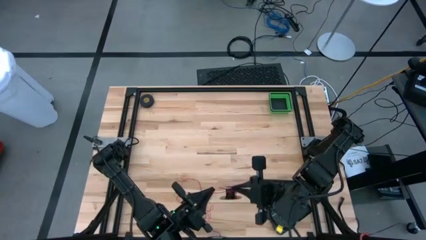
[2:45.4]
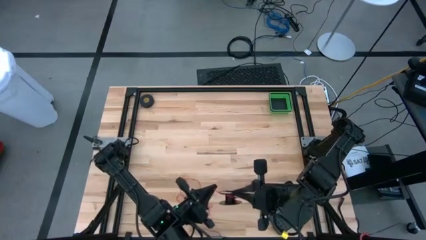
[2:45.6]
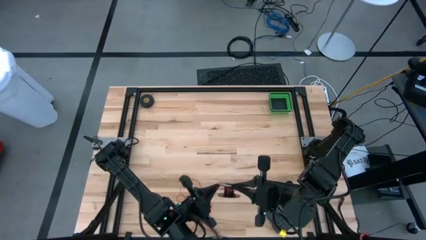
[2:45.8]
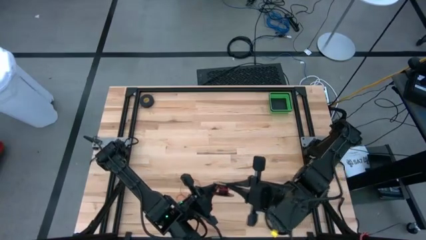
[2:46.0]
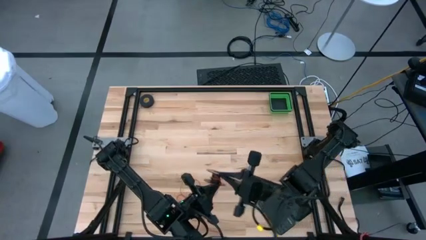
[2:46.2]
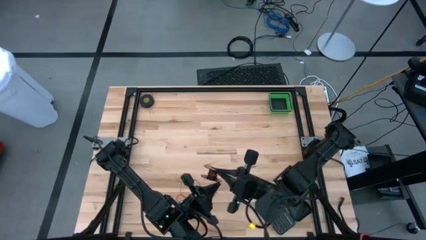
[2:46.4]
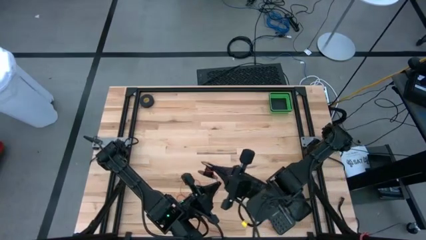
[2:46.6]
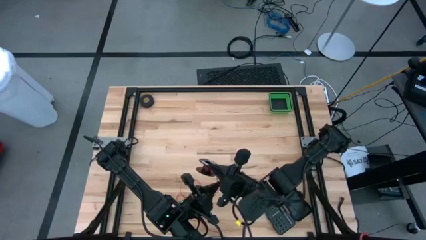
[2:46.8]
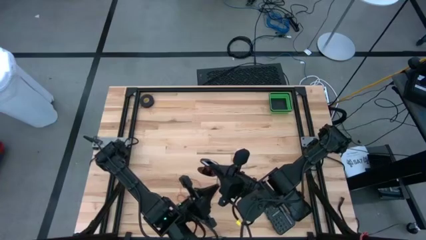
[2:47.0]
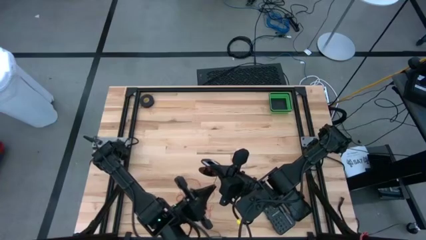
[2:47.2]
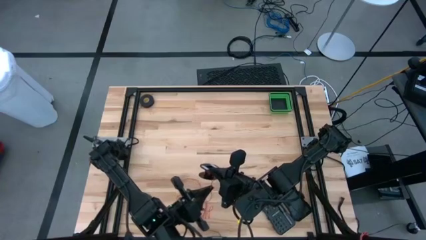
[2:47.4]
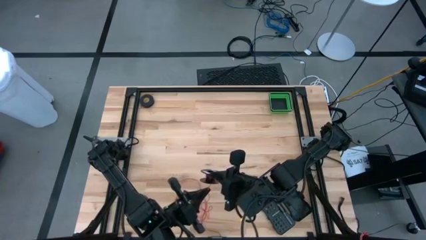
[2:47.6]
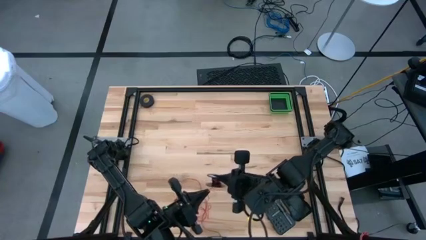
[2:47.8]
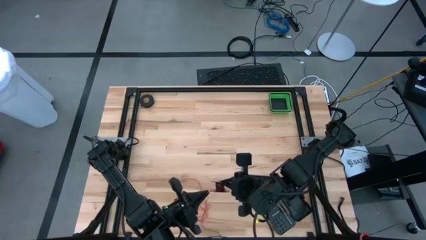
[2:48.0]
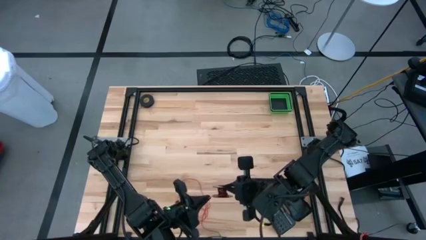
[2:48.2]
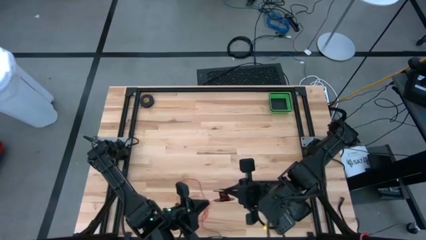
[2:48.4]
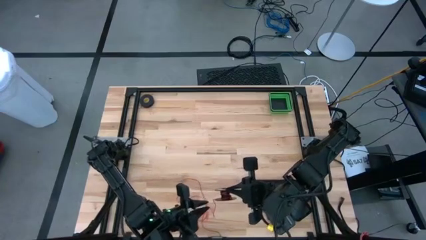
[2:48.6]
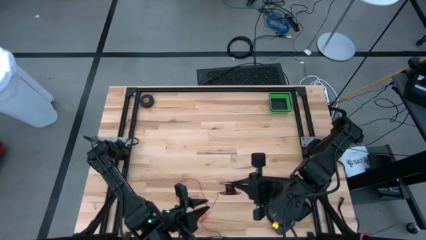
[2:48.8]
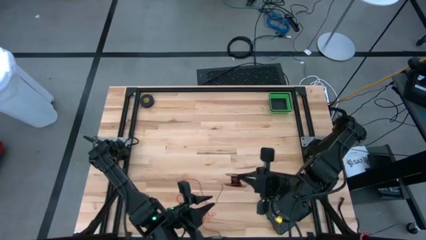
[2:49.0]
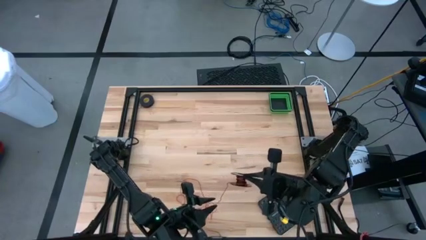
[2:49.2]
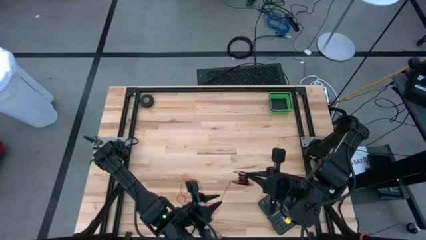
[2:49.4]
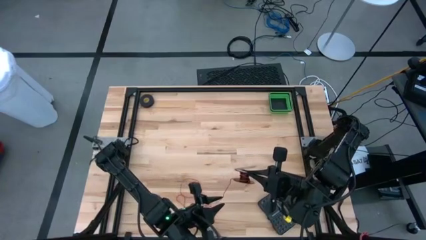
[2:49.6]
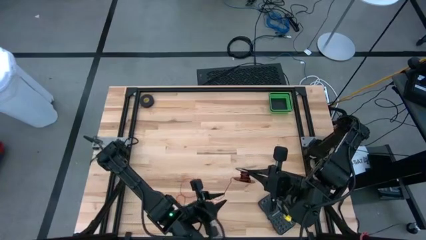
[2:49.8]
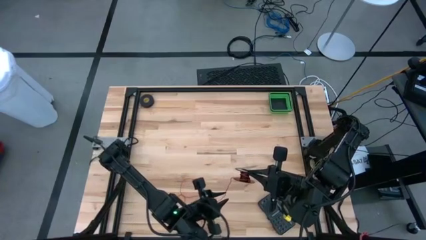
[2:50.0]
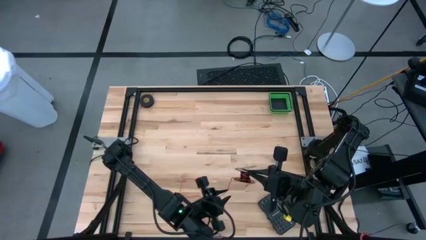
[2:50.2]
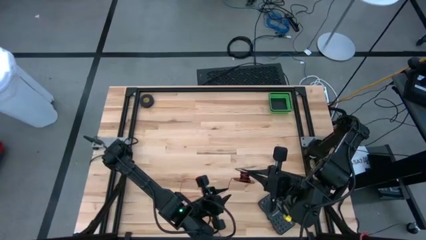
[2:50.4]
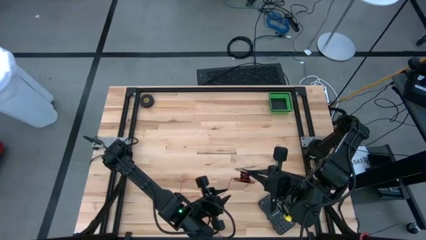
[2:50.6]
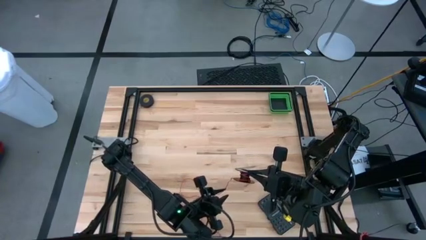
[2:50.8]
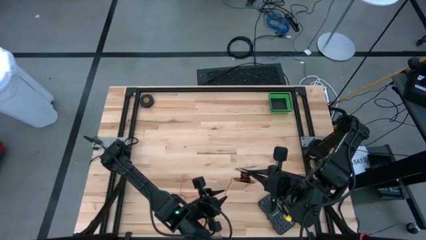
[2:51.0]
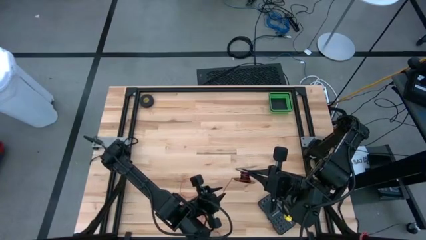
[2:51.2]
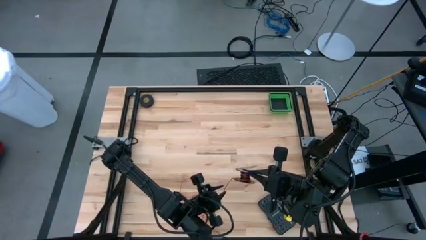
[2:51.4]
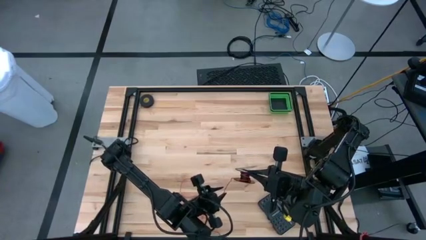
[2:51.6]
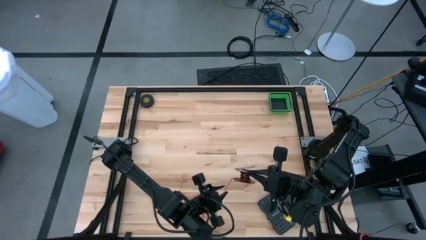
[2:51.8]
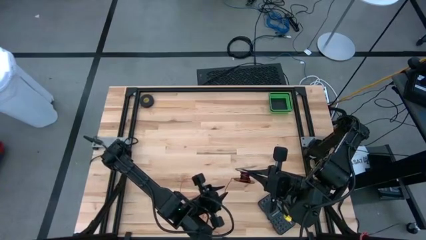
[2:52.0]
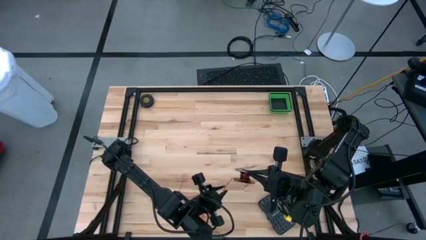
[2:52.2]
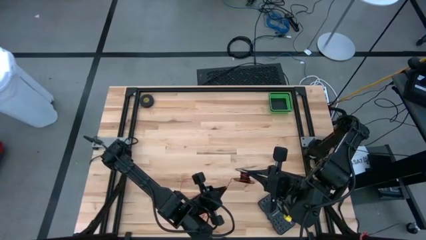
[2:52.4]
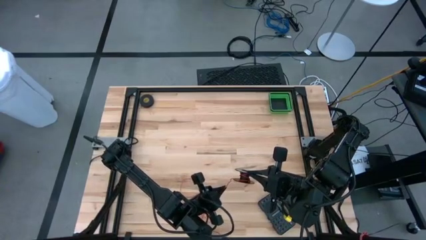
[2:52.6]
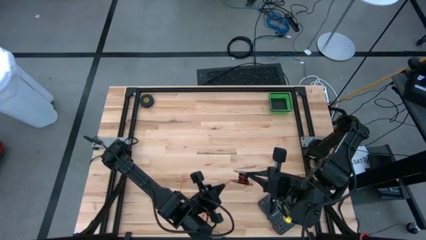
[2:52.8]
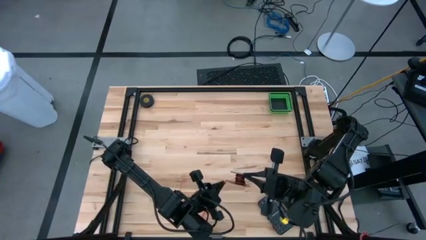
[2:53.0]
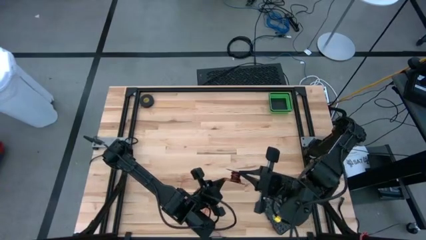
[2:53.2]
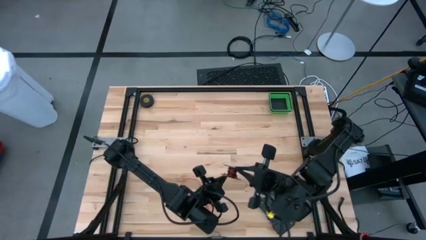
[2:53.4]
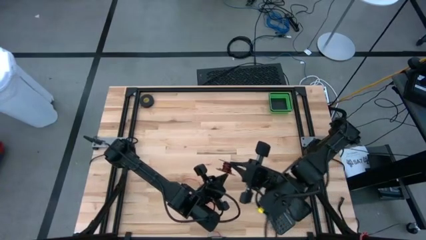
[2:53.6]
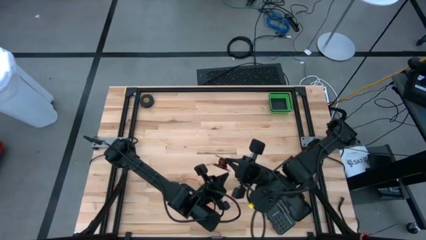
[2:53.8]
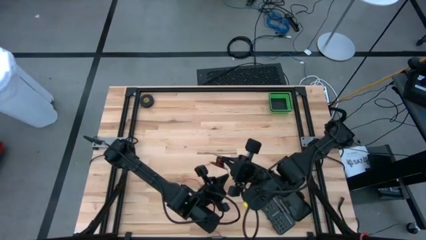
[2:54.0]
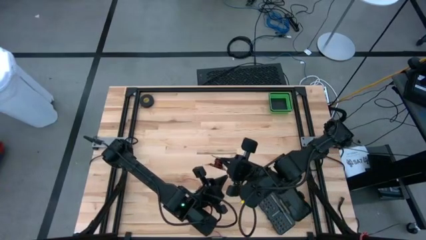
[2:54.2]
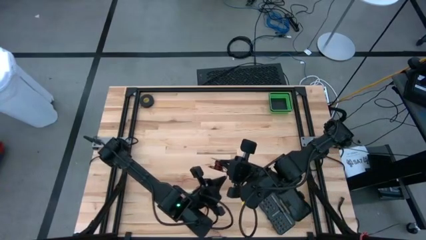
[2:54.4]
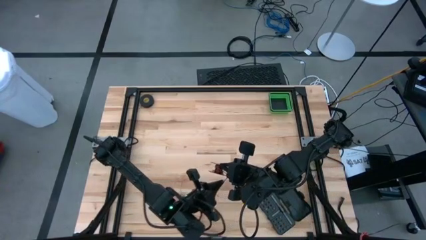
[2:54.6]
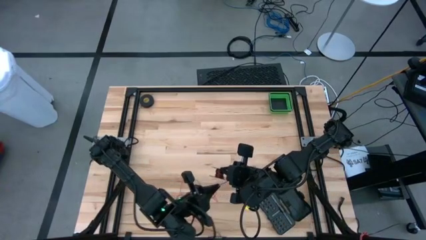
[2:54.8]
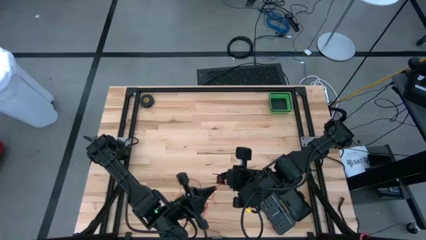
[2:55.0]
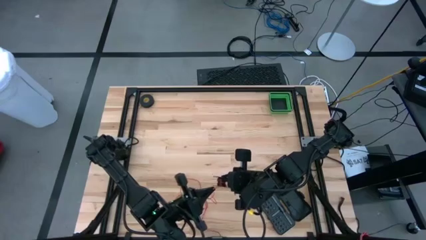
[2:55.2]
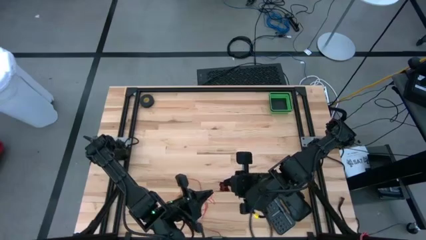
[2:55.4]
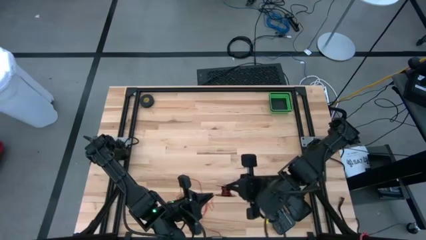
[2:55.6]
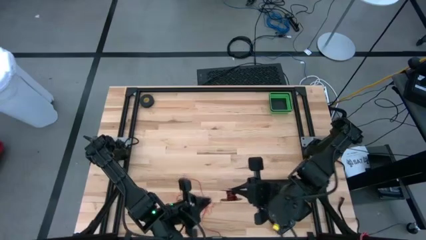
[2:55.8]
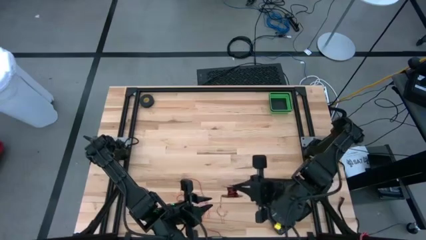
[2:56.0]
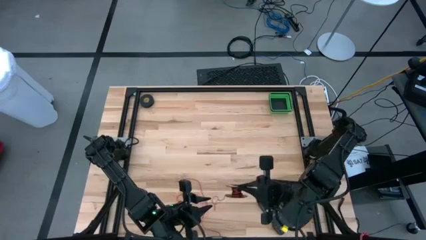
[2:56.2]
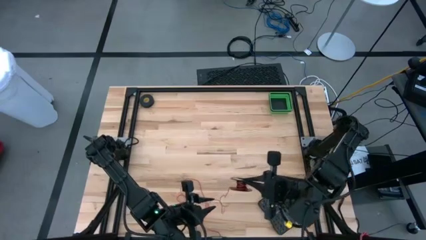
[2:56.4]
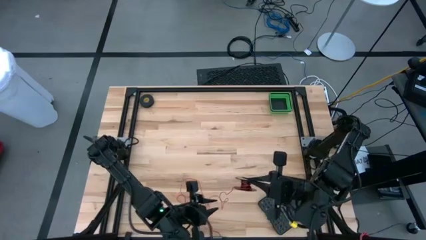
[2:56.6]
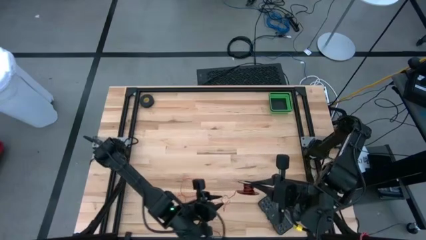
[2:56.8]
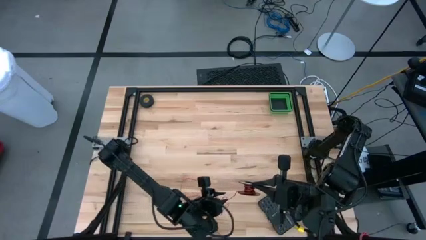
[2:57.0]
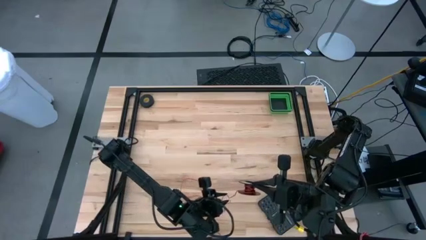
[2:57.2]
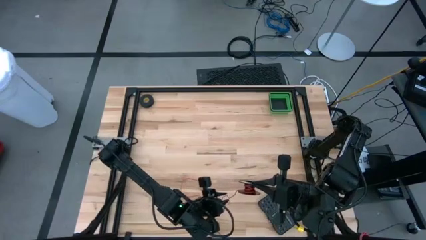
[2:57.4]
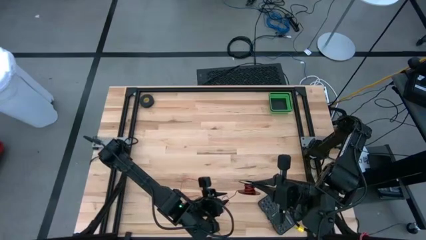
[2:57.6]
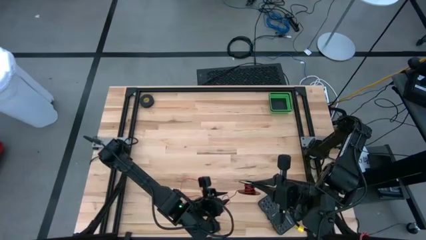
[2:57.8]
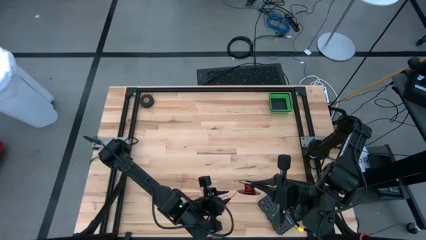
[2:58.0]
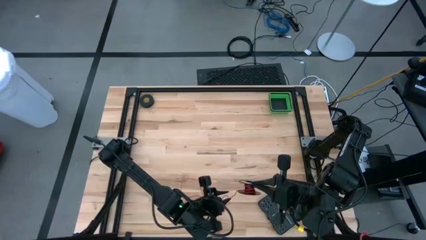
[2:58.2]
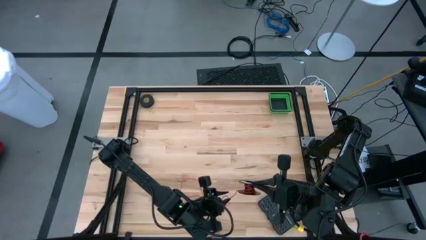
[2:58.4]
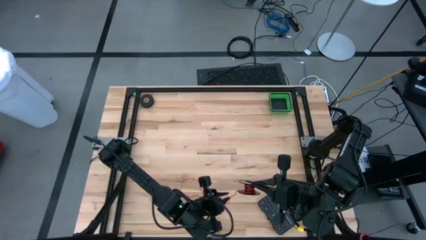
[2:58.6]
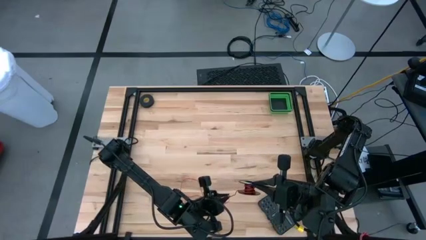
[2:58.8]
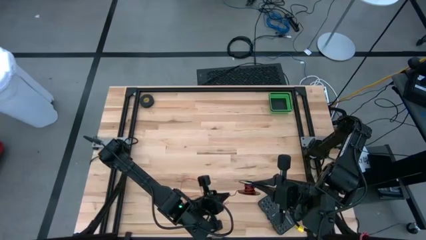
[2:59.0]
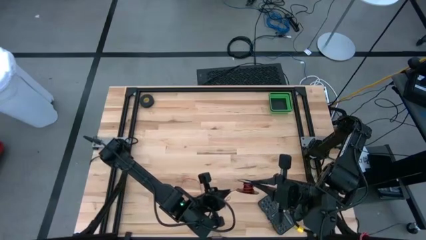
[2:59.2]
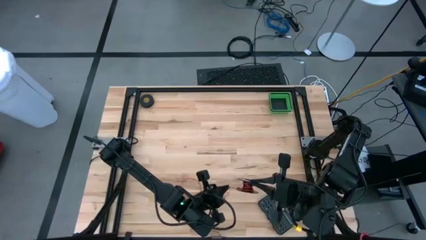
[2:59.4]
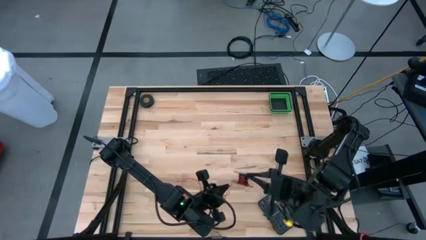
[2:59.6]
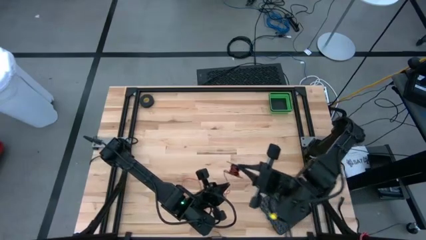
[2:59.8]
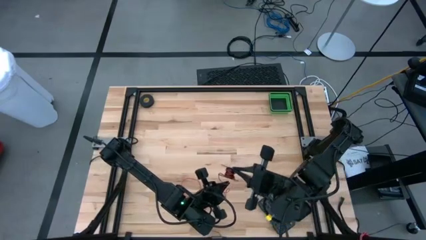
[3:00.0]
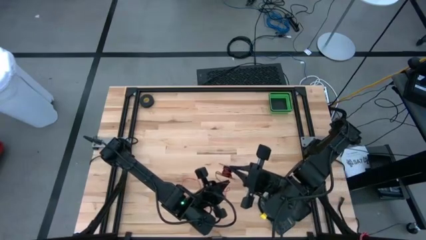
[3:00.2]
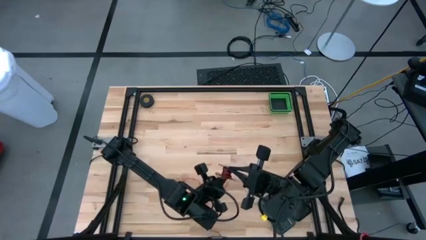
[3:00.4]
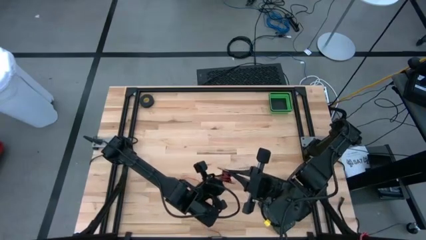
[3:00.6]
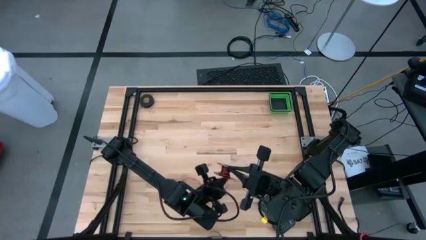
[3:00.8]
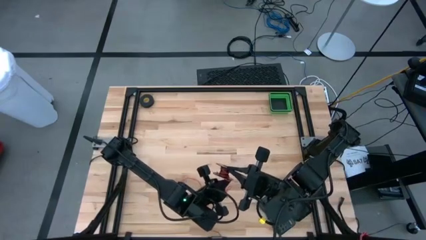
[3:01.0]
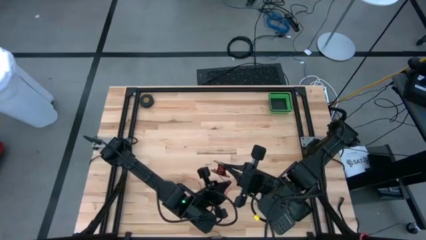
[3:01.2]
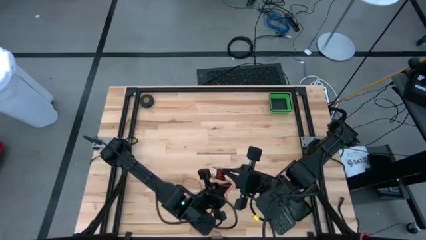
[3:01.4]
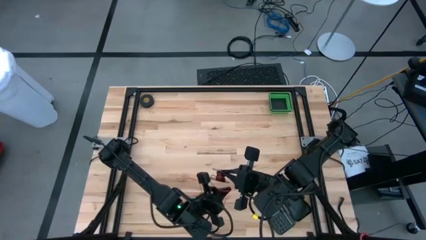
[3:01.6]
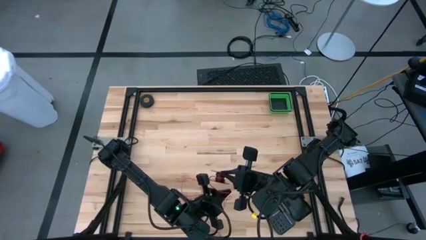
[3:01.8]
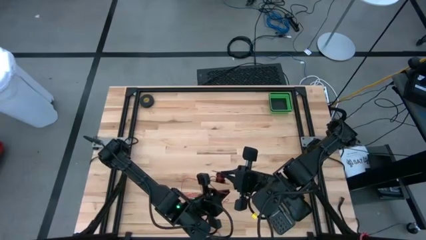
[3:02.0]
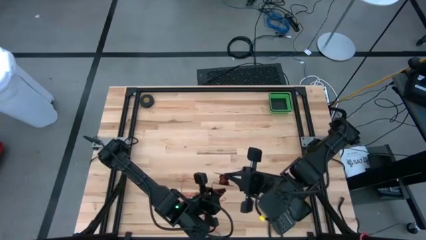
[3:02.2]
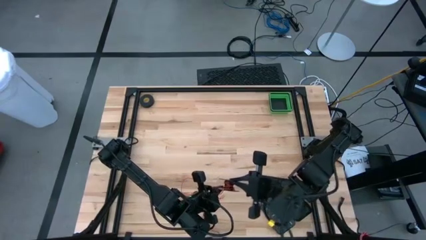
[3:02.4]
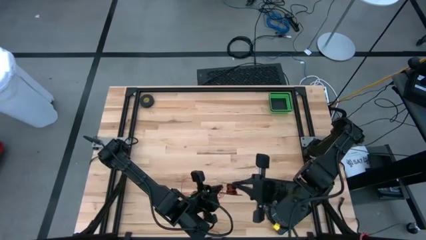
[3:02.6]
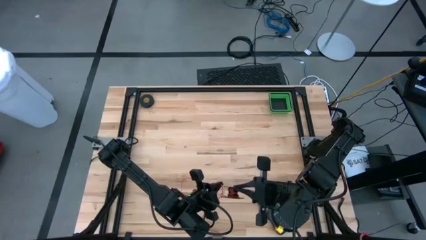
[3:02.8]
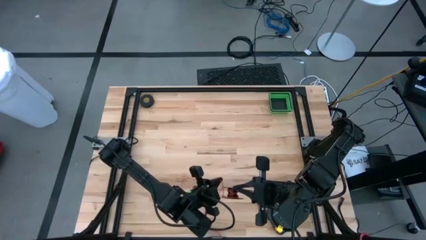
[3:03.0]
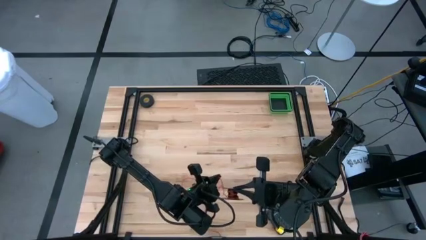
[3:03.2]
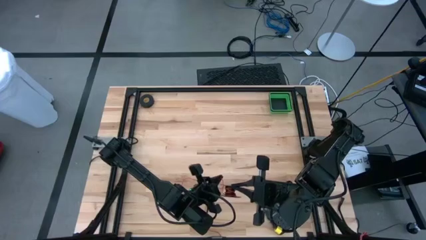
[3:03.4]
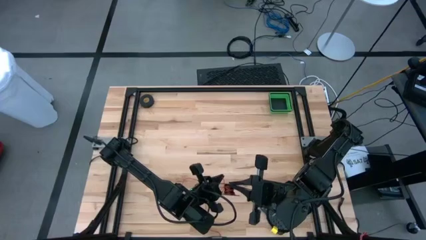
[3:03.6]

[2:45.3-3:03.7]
Task: Coil cords
Coil the red wire on the black spool
